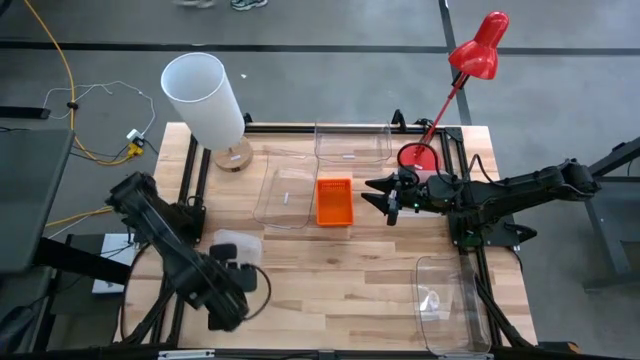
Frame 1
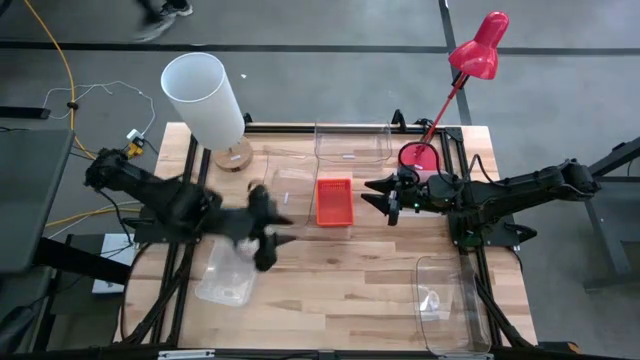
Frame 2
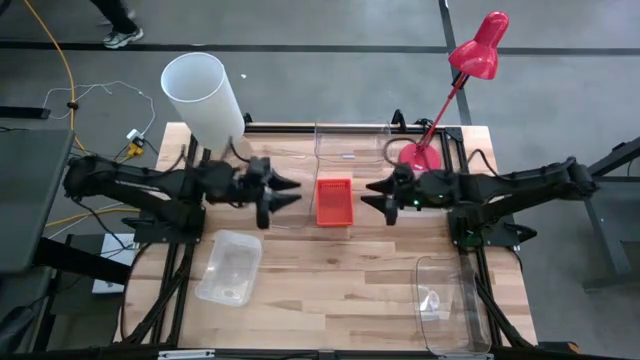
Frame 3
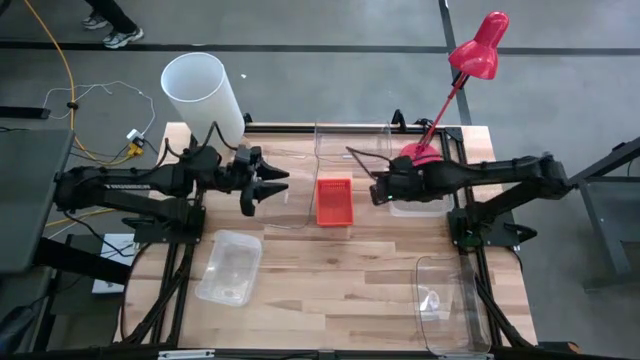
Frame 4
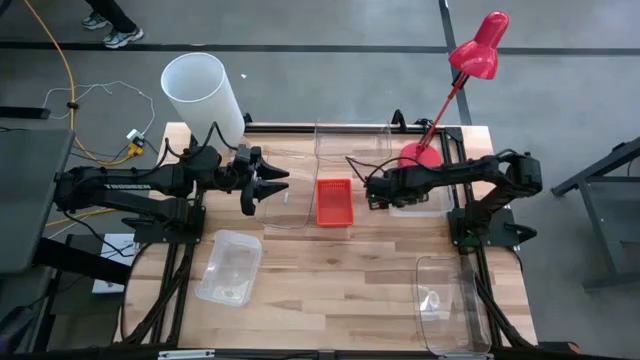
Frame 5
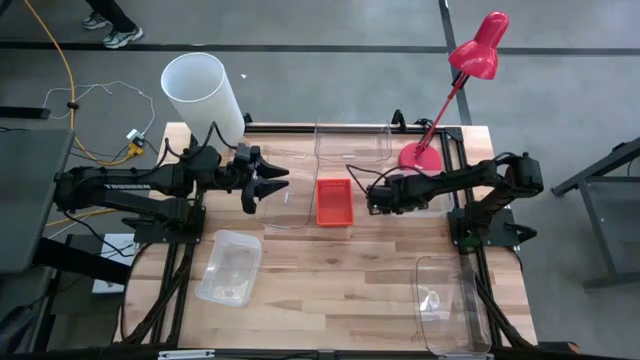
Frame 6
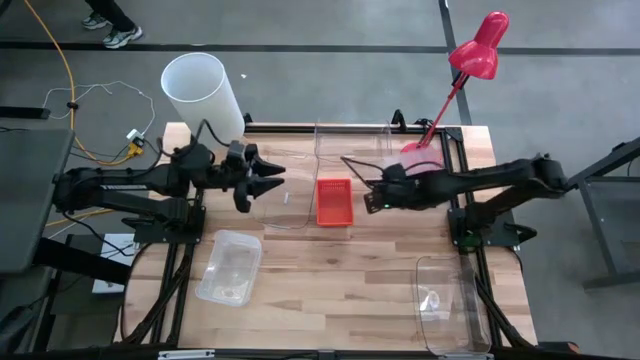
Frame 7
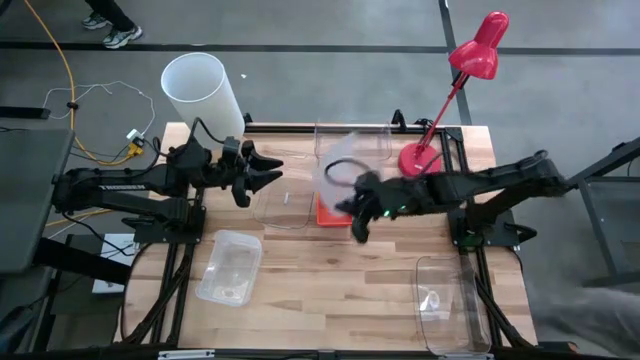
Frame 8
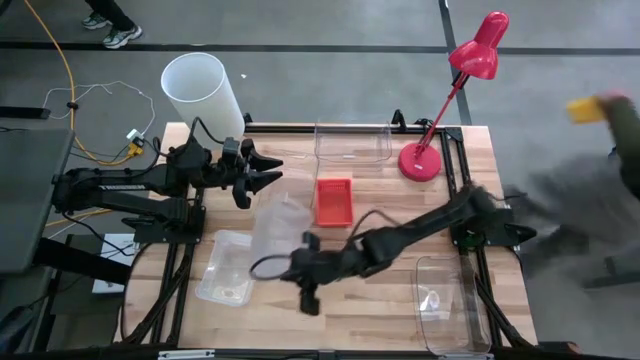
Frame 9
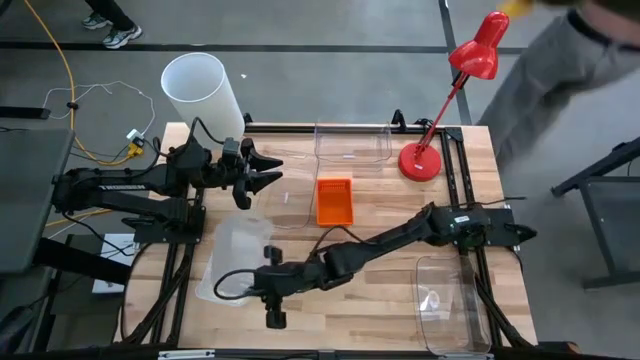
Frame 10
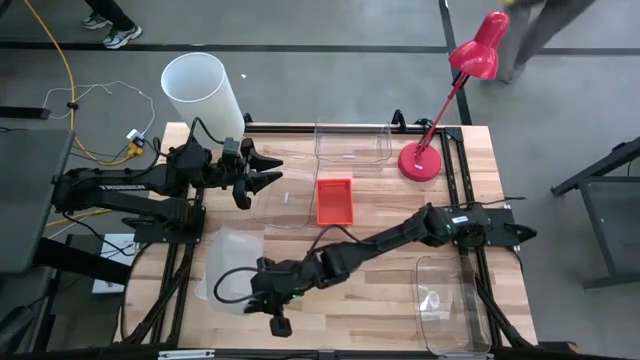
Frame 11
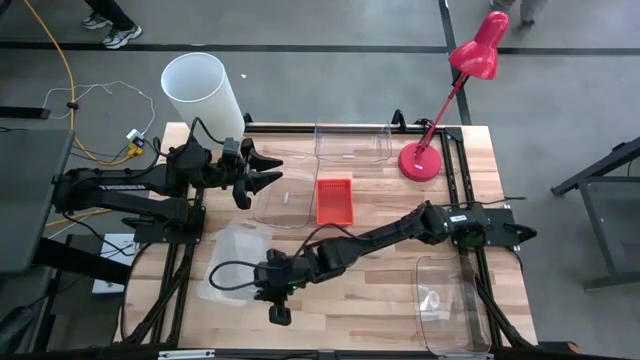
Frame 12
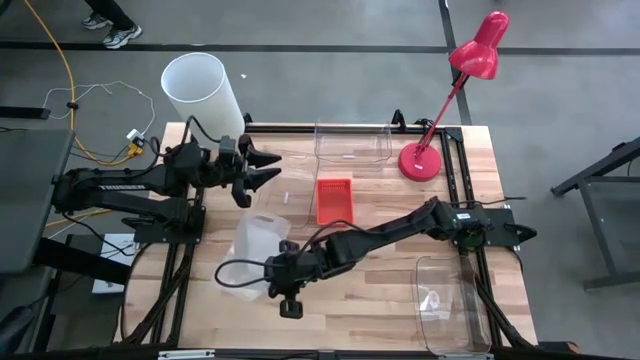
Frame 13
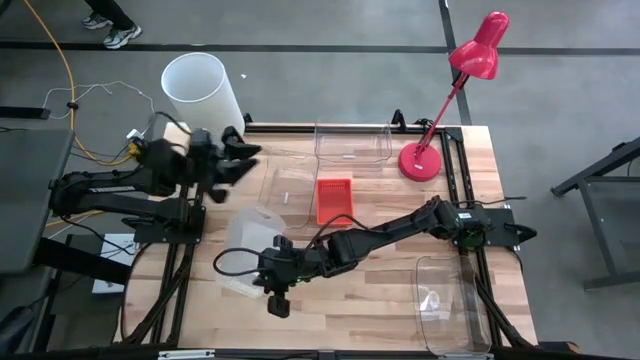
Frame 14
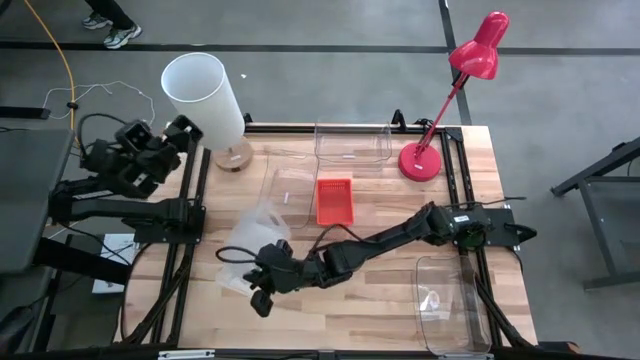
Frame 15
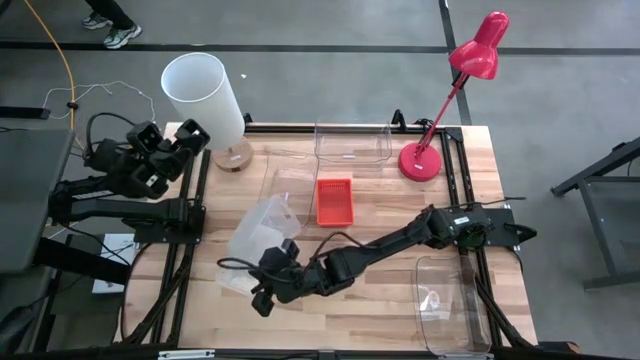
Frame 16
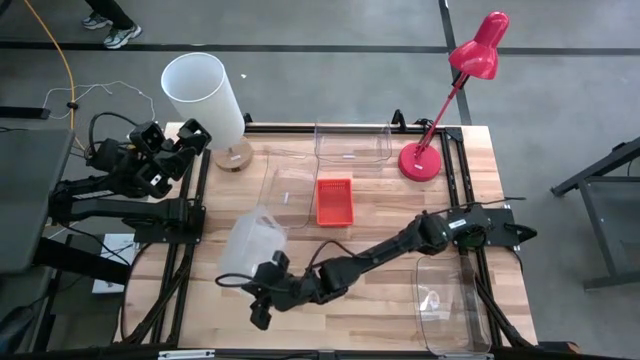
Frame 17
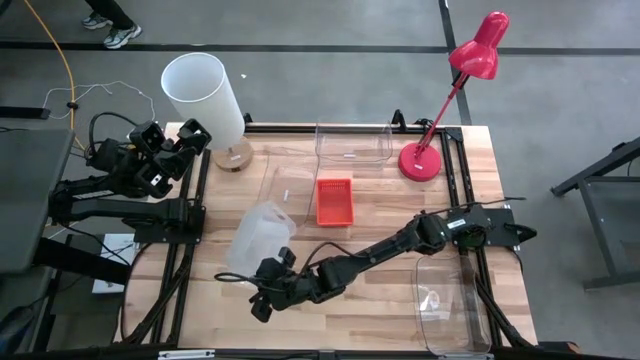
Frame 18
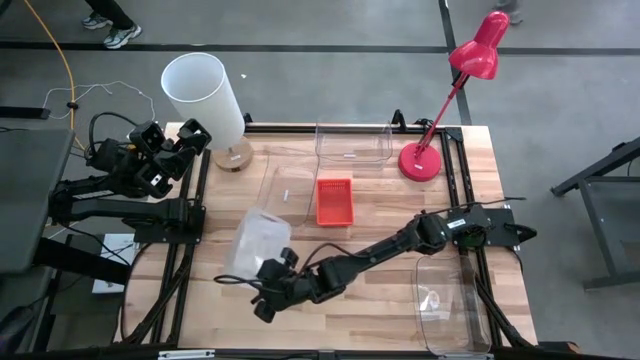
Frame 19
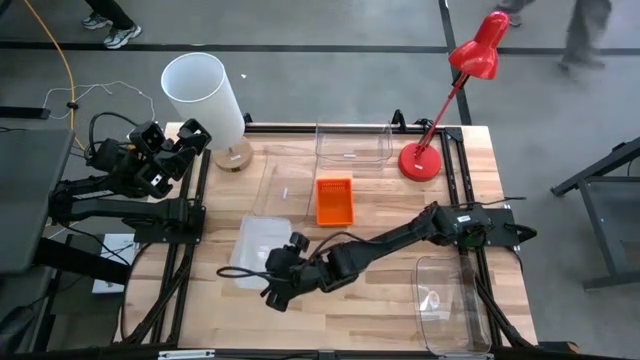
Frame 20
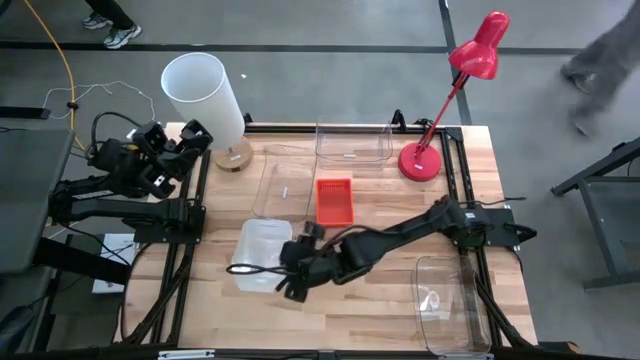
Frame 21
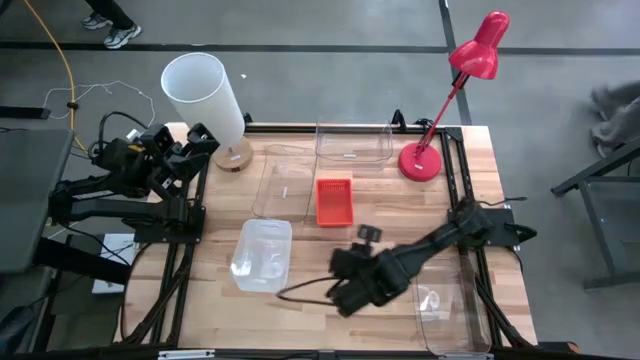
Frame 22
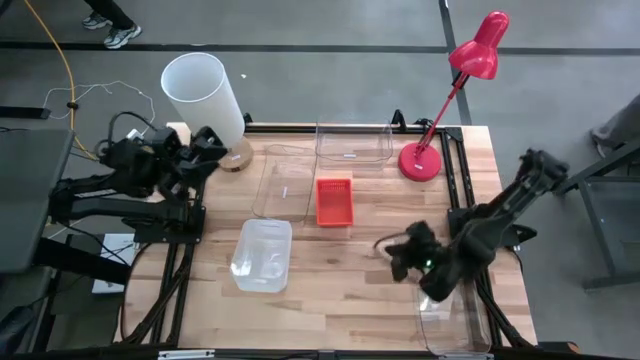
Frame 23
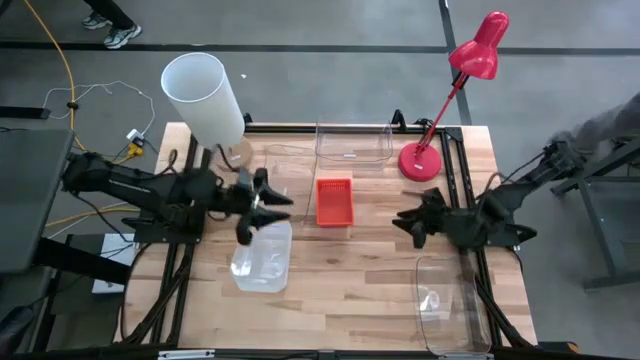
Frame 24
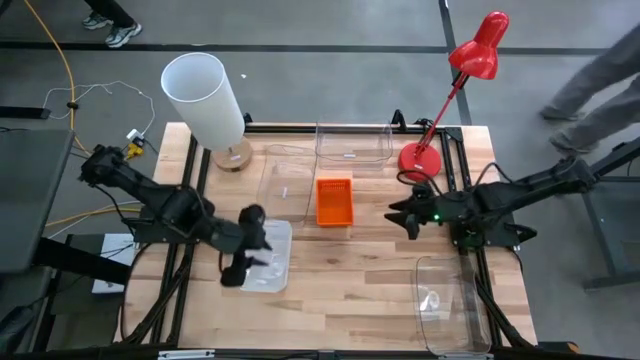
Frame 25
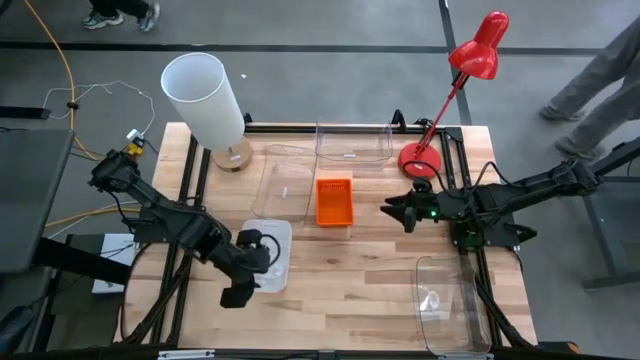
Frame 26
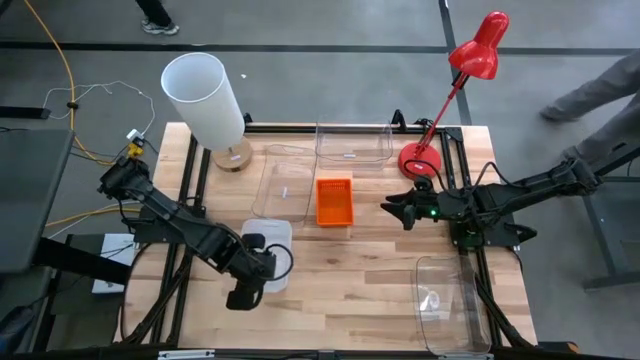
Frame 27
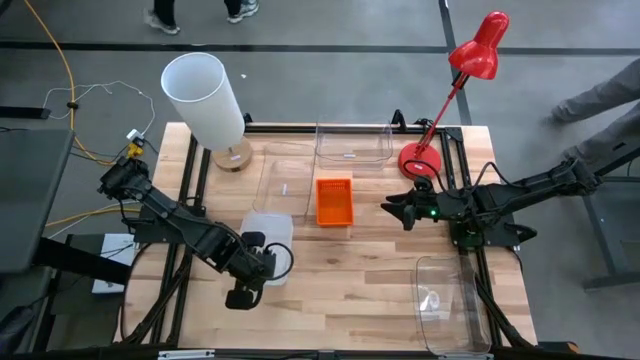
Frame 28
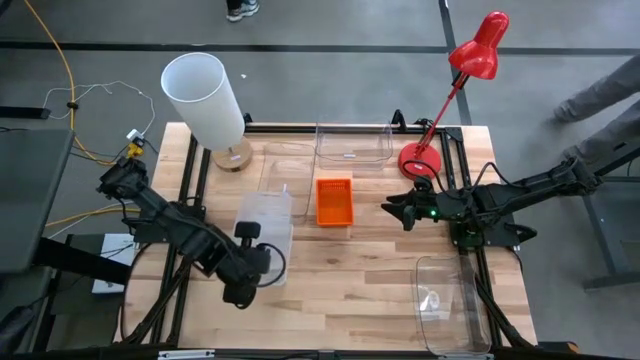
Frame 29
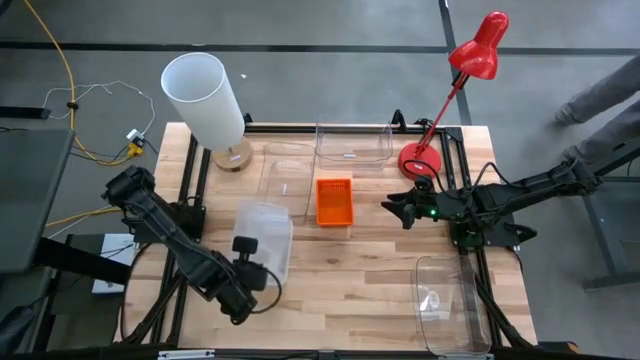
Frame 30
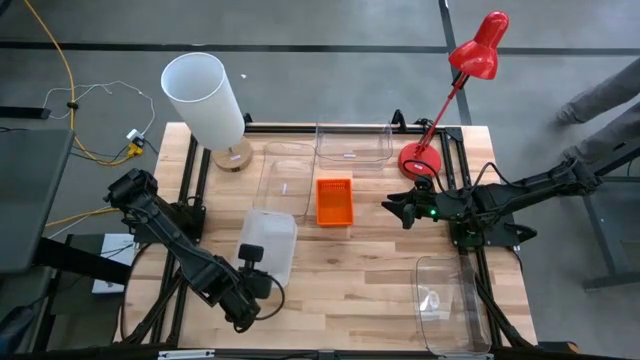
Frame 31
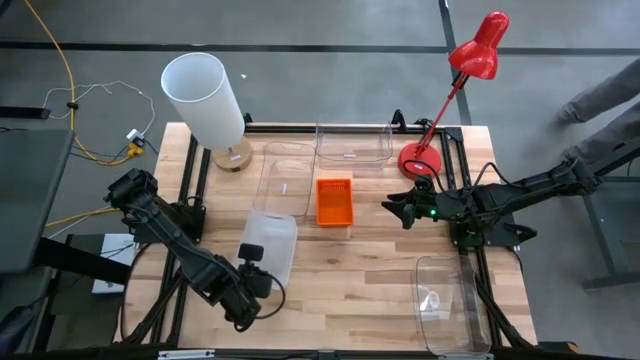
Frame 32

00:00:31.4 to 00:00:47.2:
Stack the top white bin on top of the bottom white bin

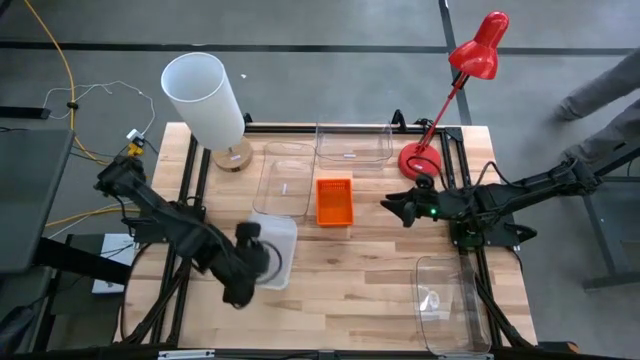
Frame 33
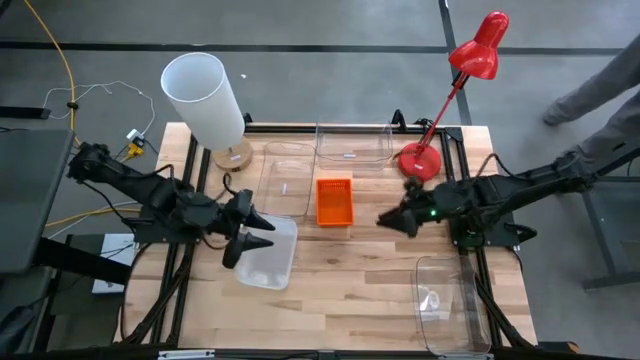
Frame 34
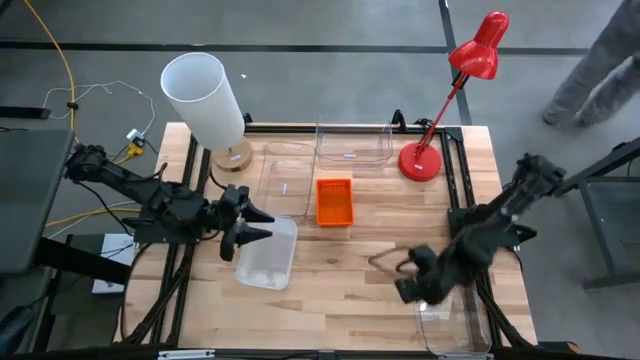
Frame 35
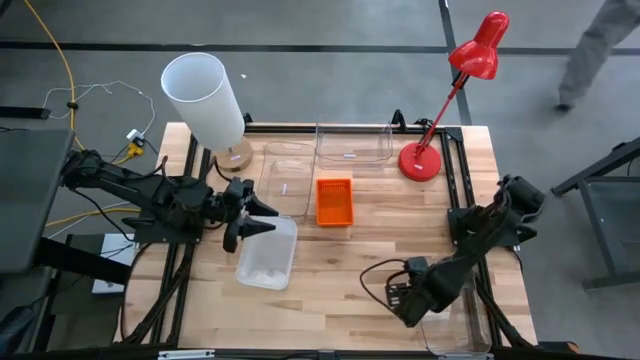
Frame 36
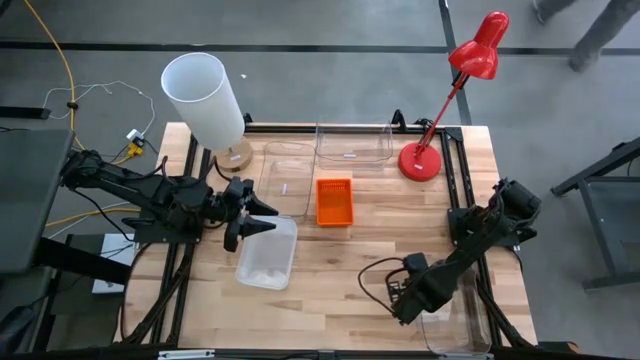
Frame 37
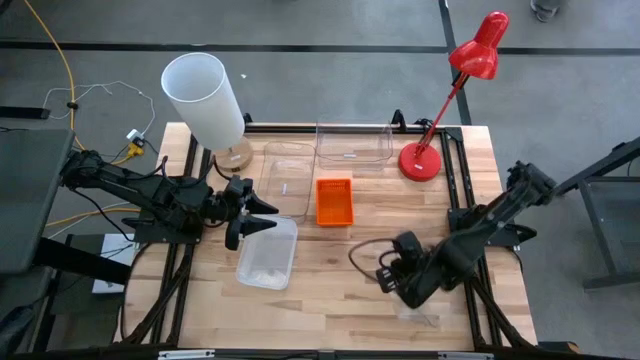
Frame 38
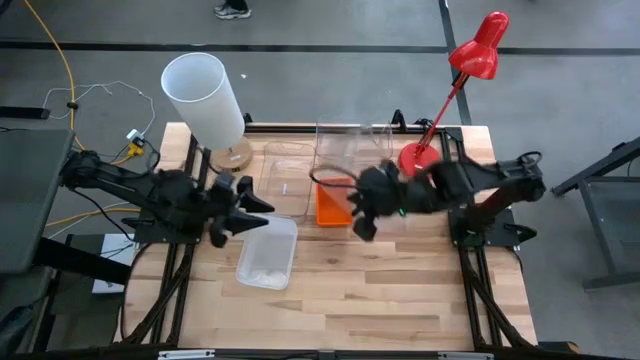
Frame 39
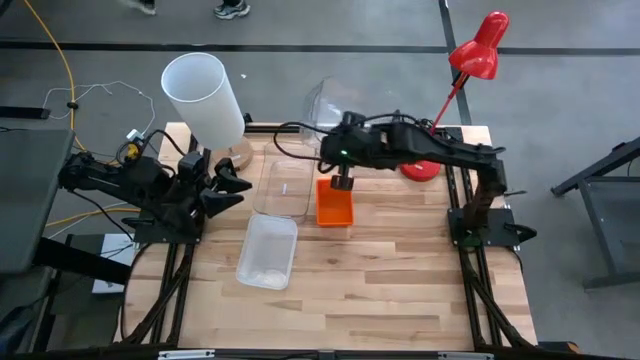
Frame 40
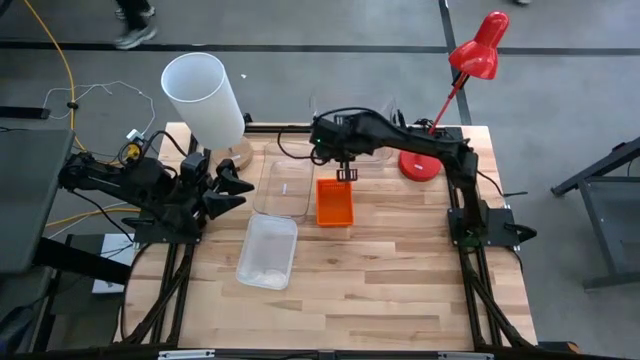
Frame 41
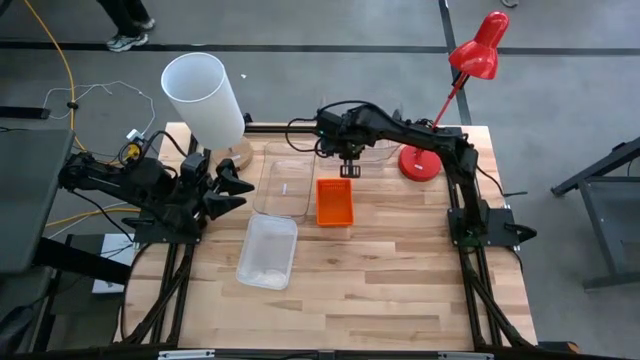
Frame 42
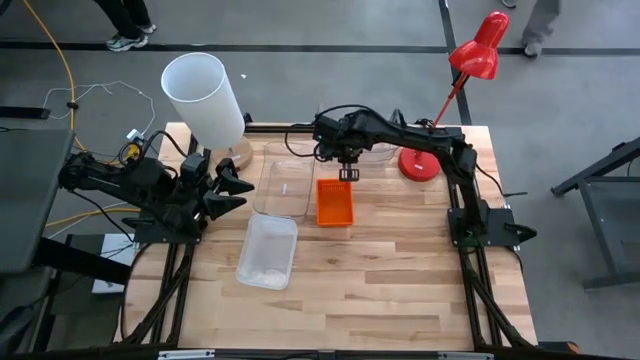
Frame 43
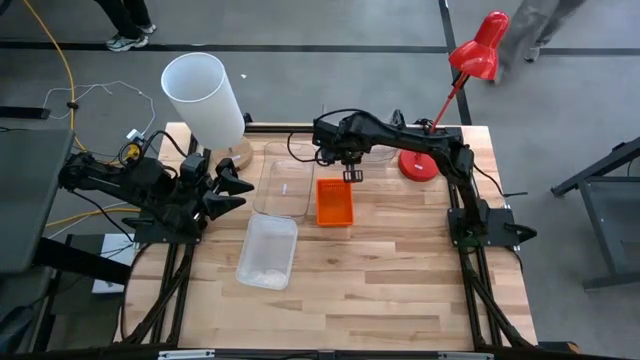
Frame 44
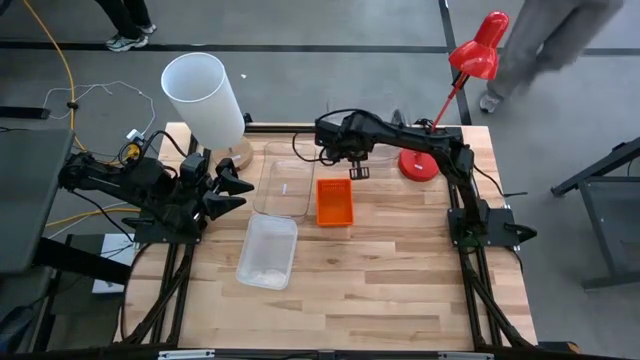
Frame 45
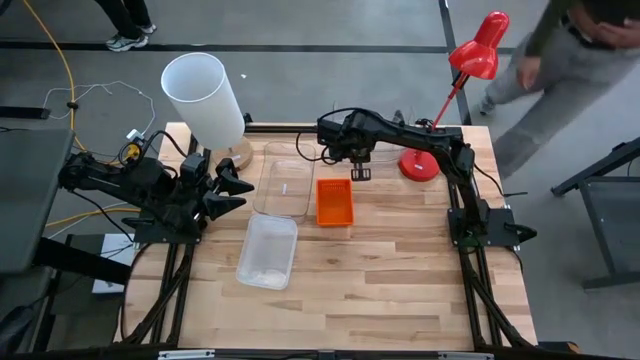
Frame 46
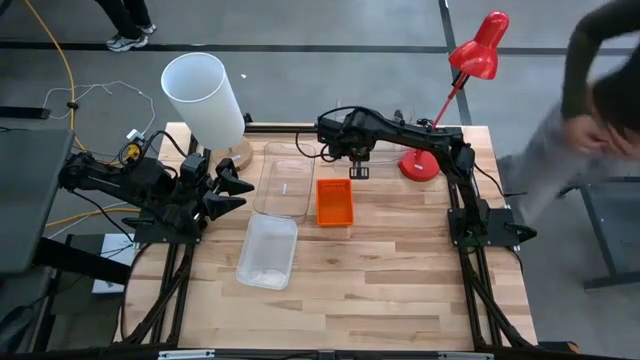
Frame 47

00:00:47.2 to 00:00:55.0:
Stack the bottom transparent bin on top of the top transparent bin
